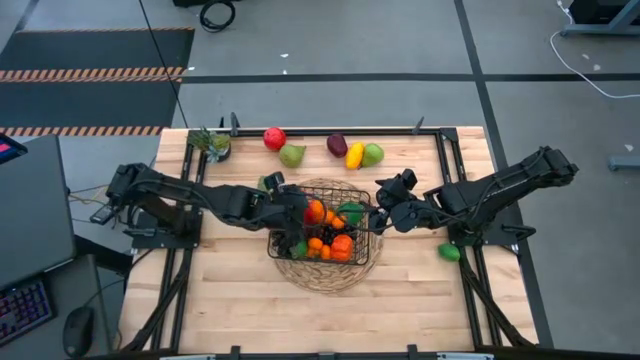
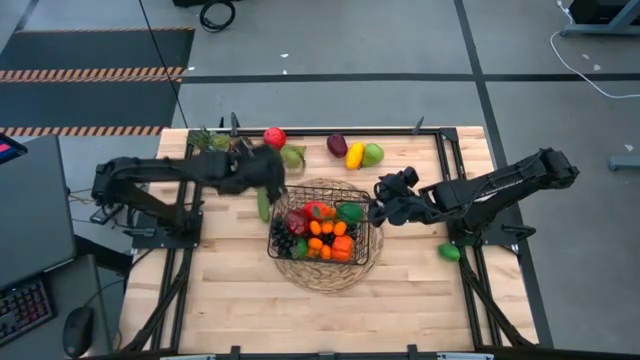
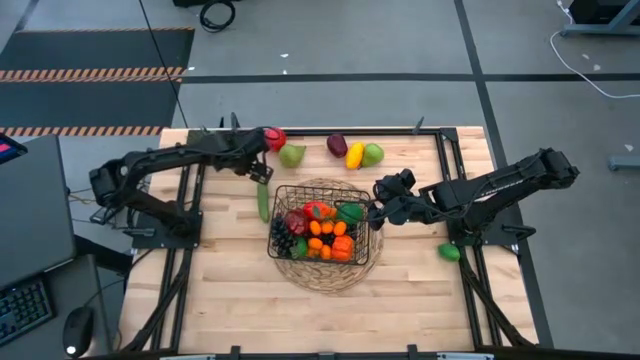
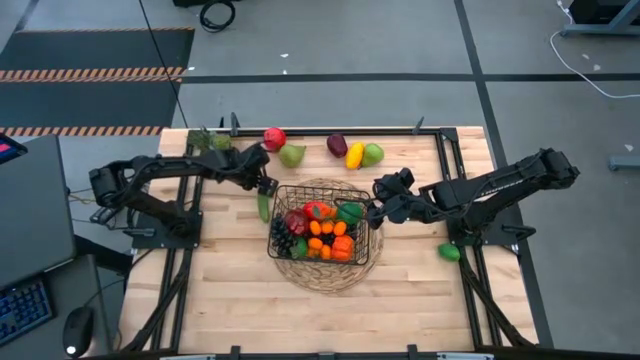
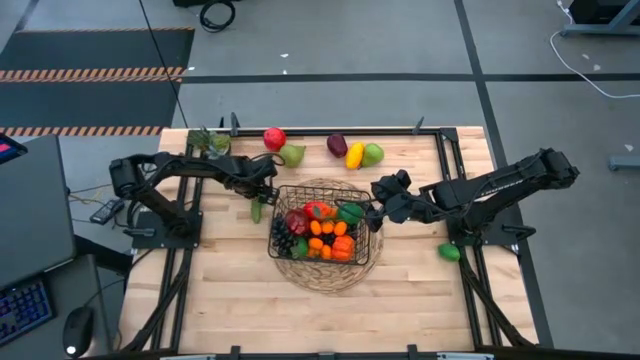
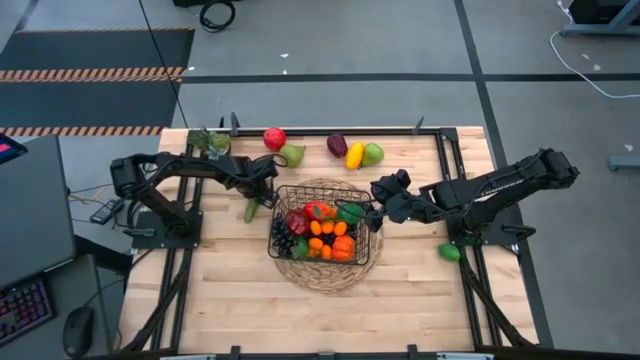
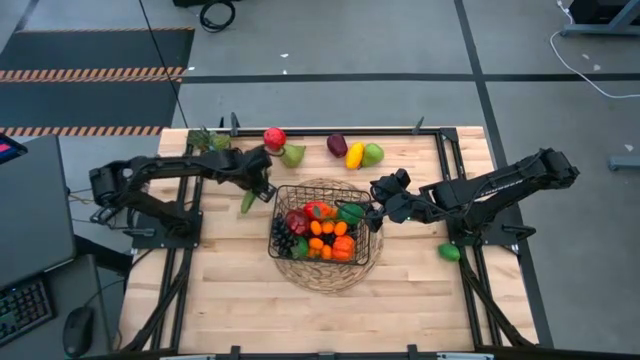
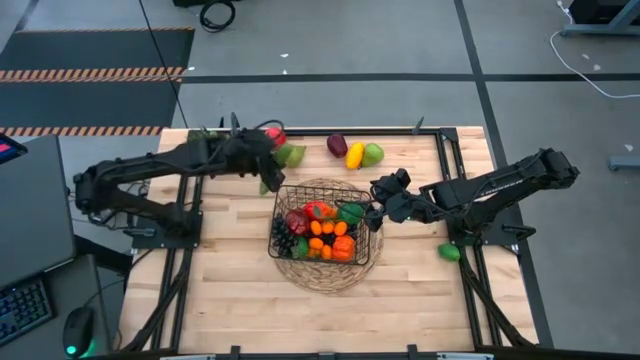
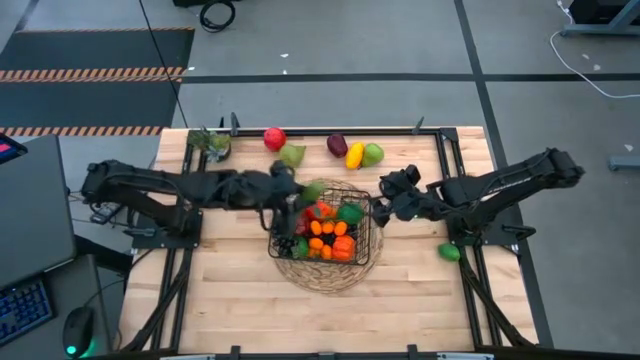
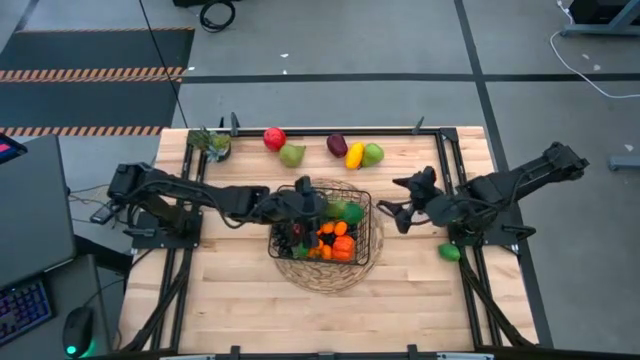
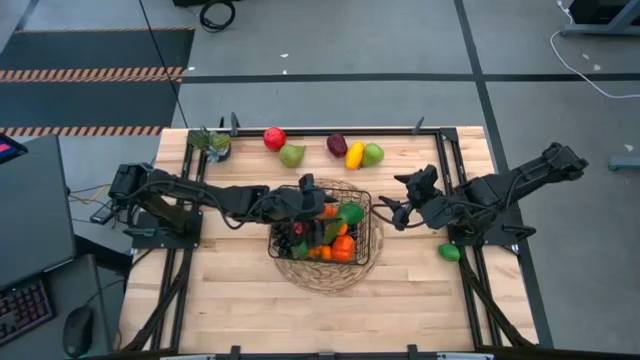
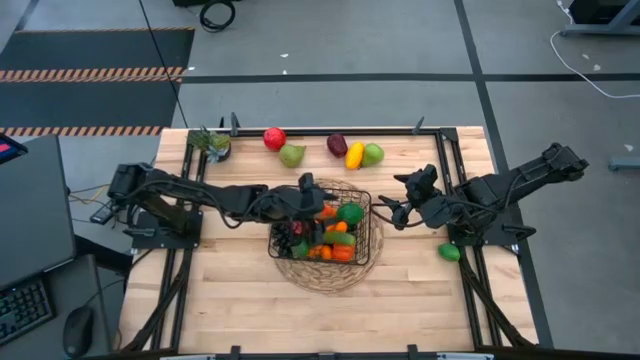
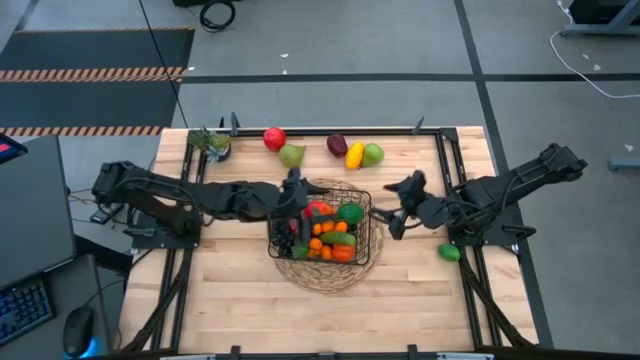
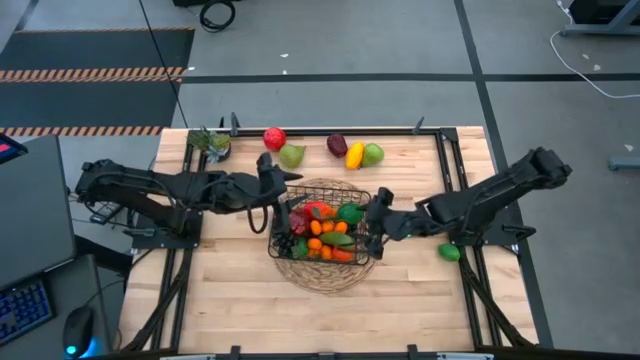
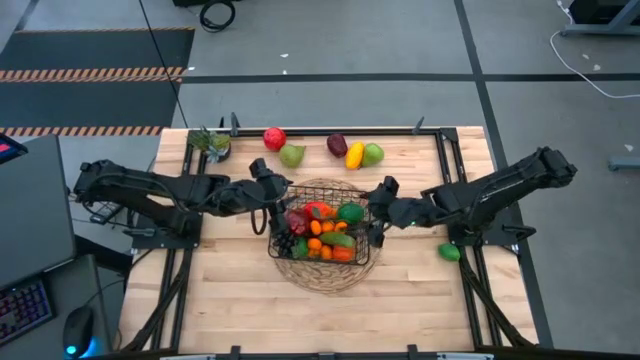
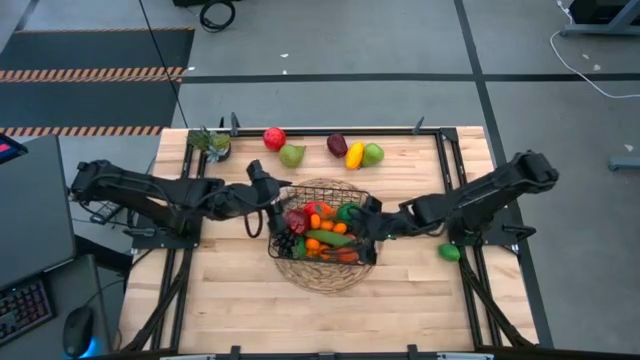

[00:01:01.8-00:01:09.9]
Task: Build produce basket
Put the green cucumber into the black wire basket

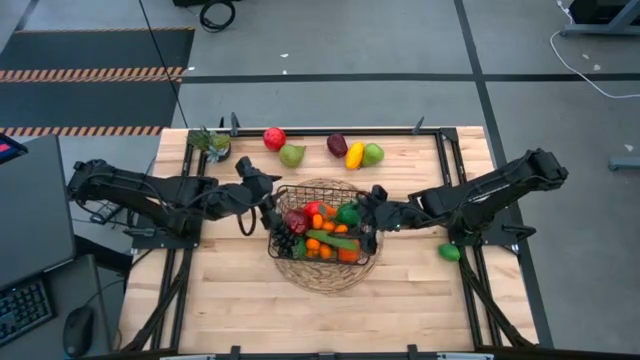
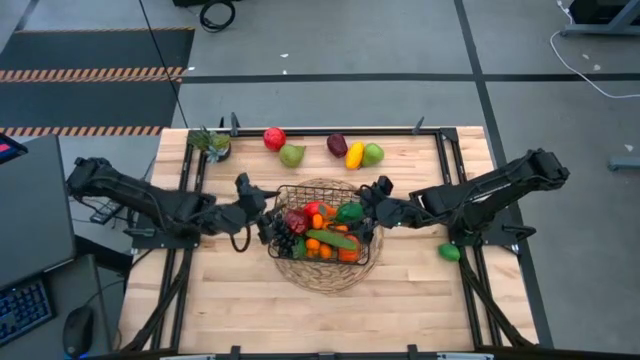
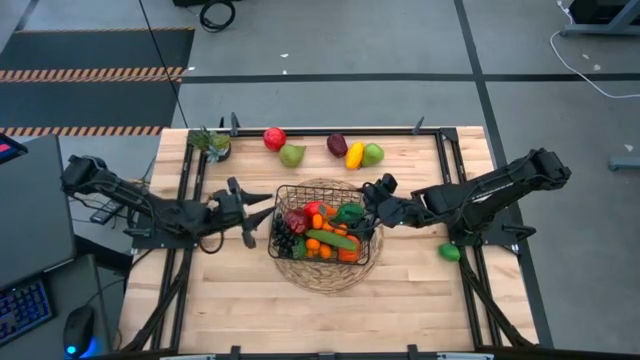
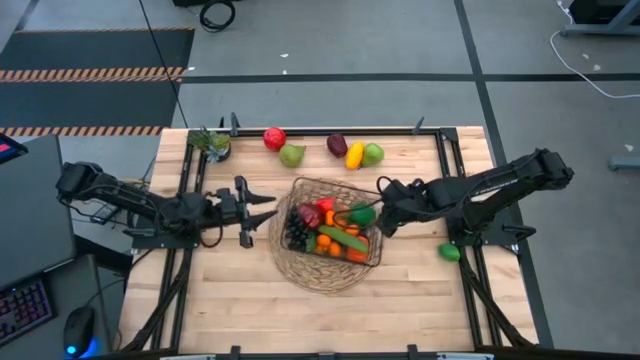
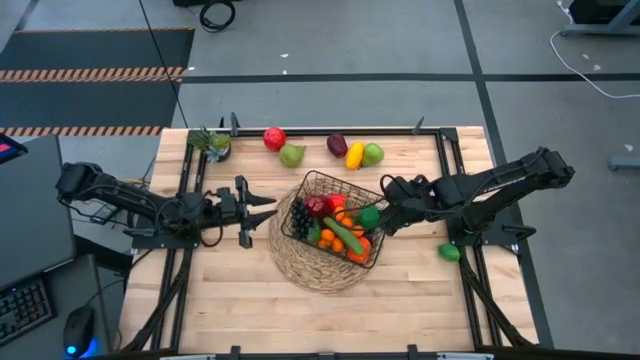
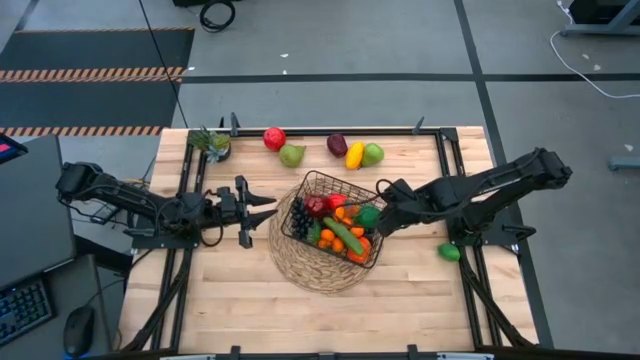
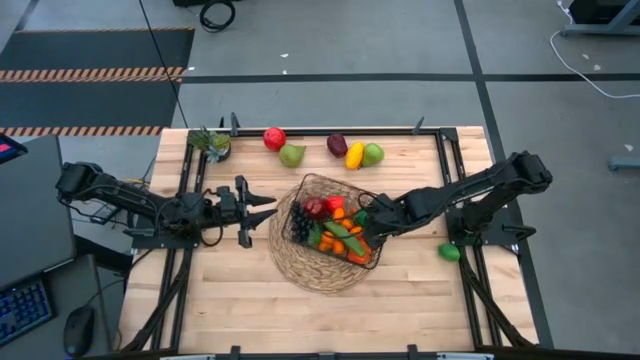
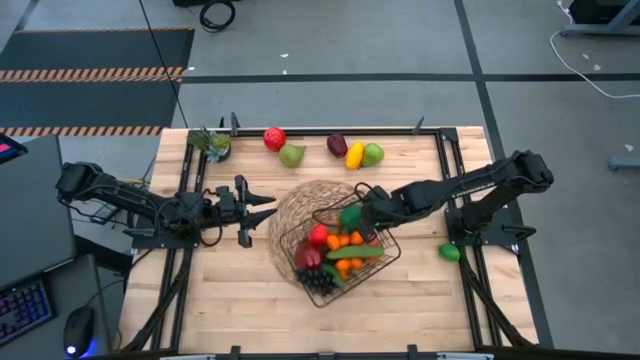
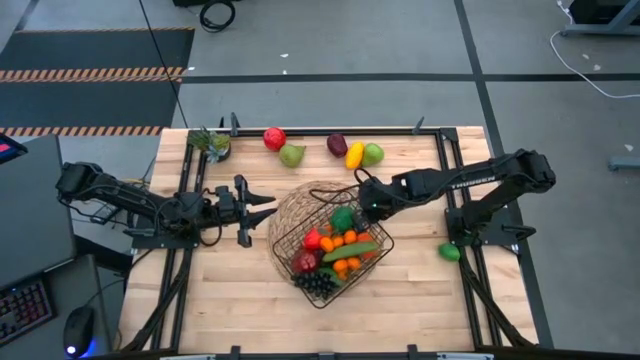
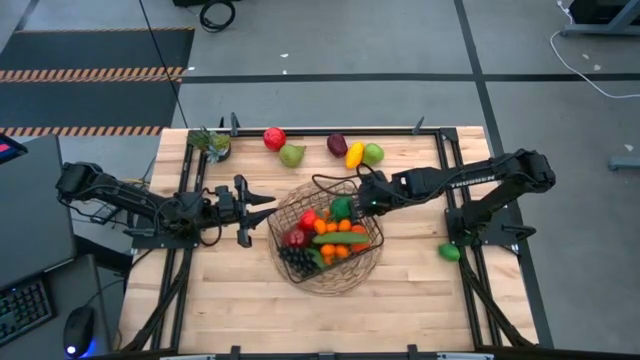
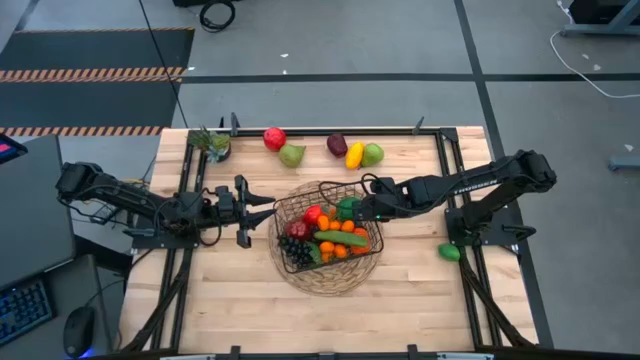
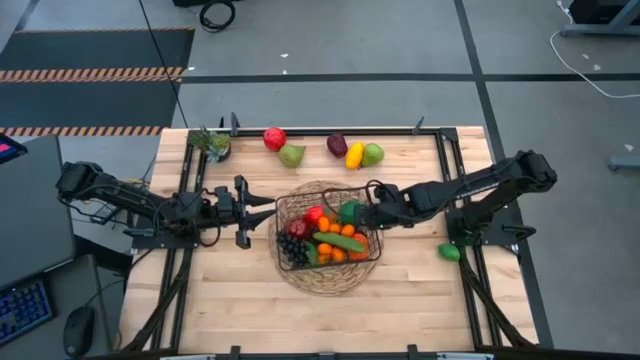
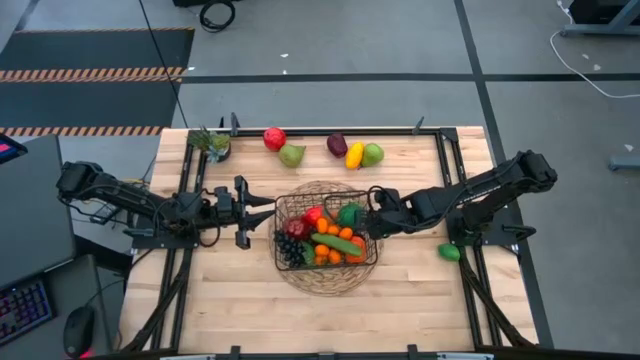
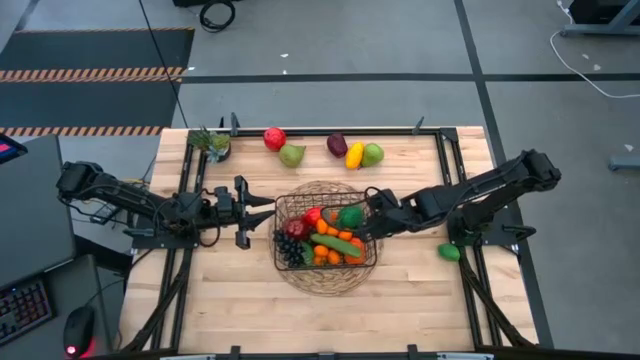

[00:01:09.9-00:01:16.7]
Adjust the black wire basket

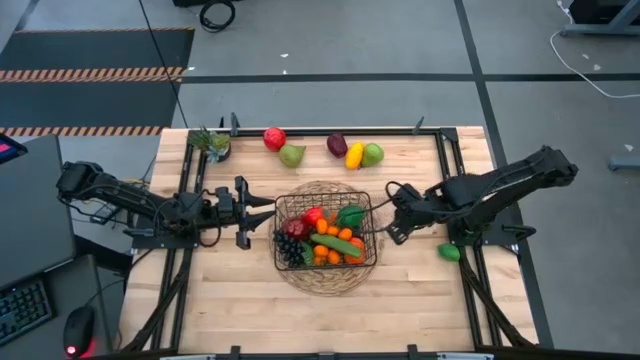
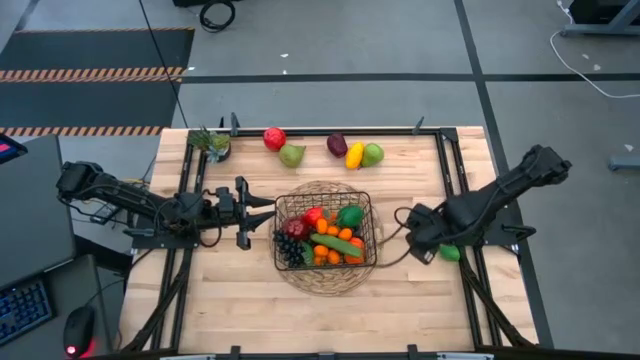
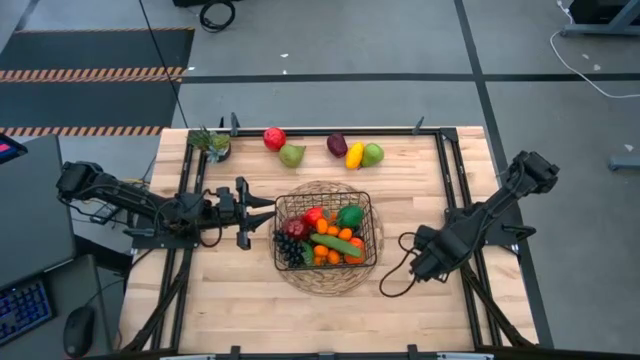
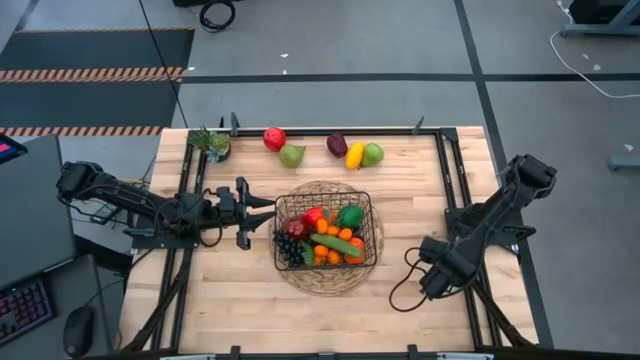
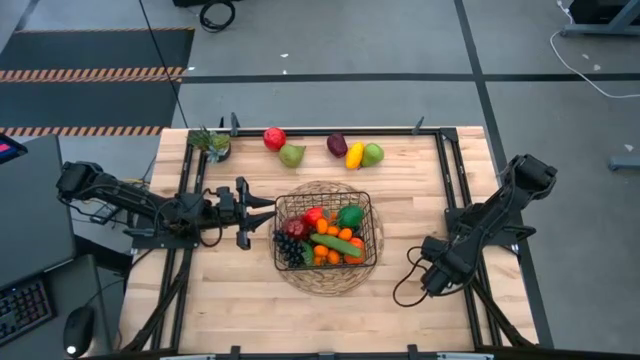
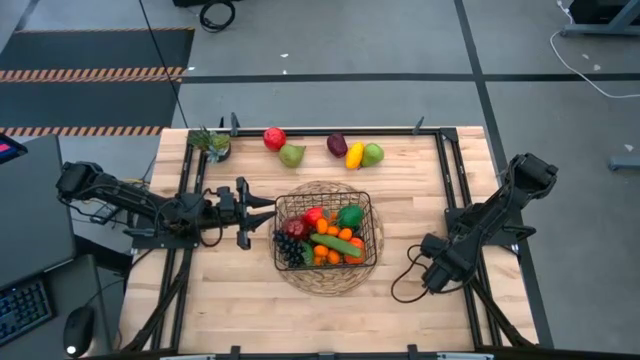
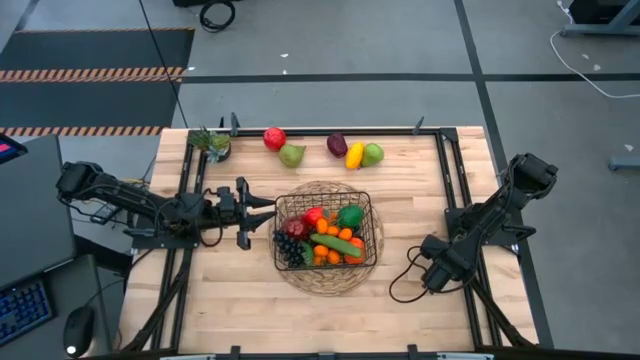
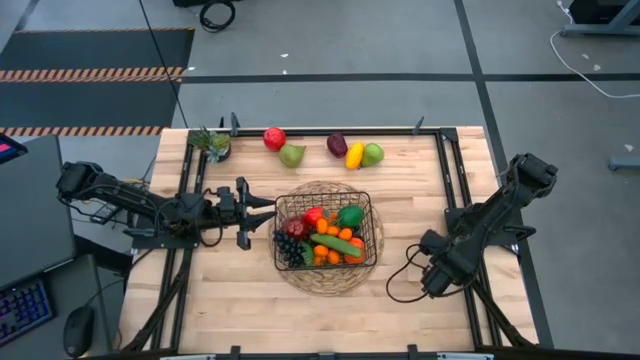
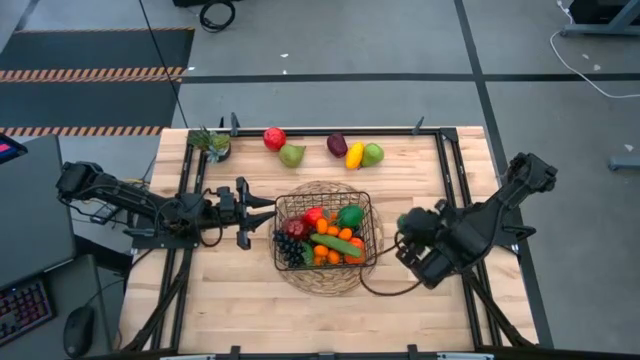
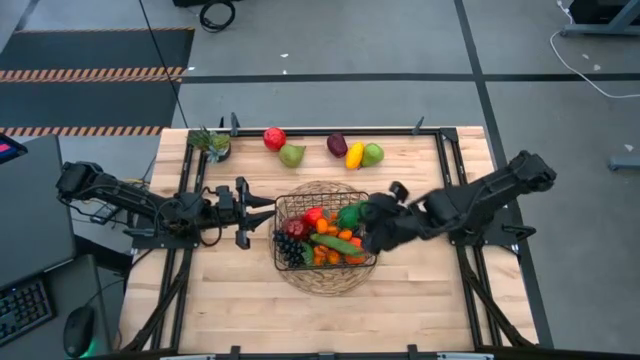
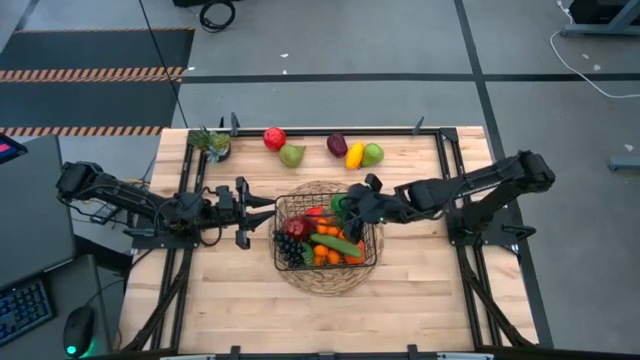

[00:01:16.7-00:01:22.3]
Put the green lime into the black wire basket

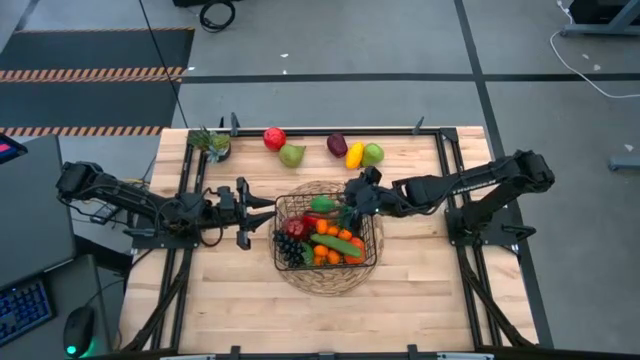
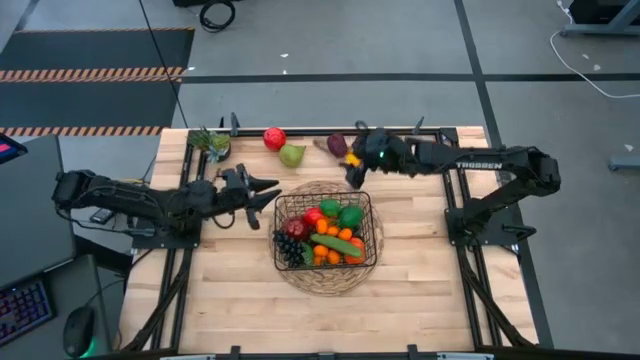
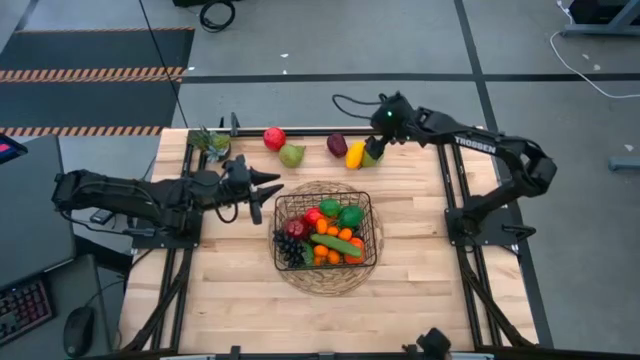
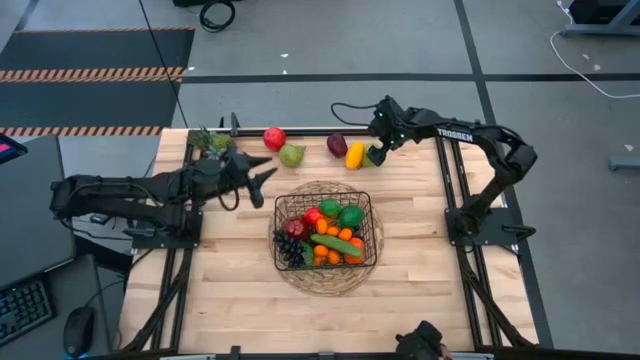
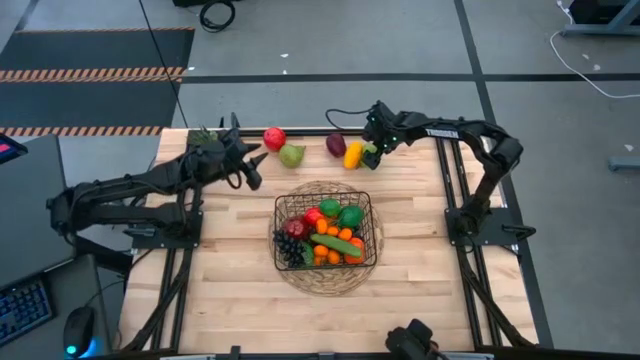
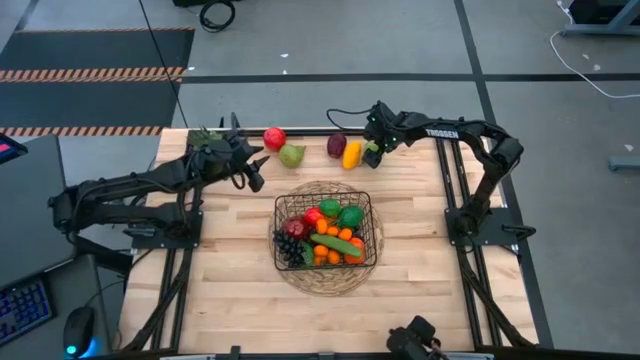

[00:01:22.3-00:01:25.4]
Put the right green pear into the black wire basket
